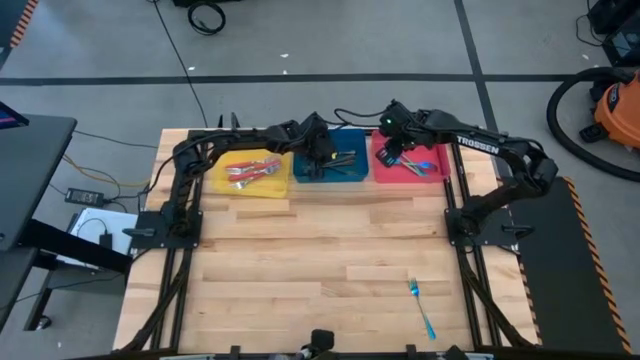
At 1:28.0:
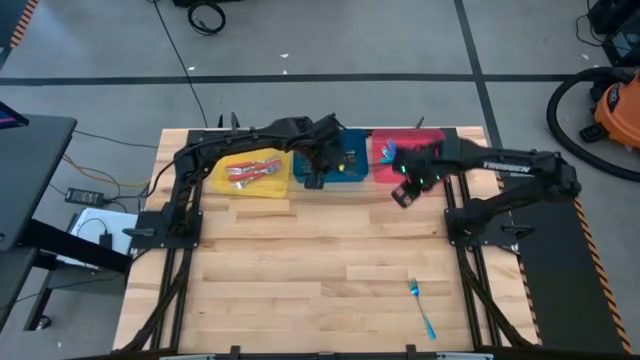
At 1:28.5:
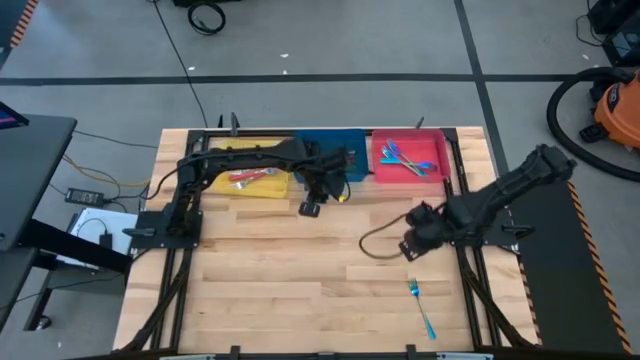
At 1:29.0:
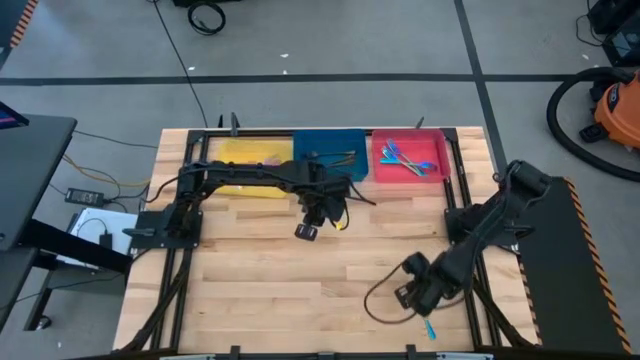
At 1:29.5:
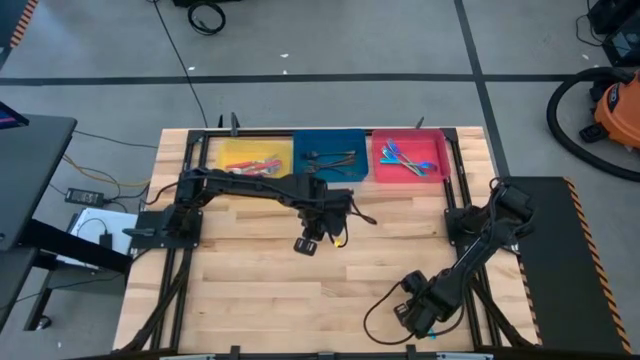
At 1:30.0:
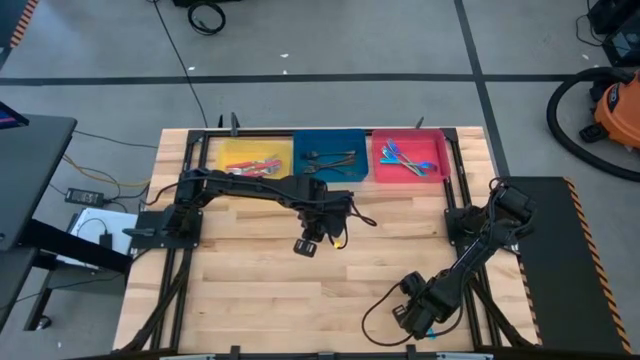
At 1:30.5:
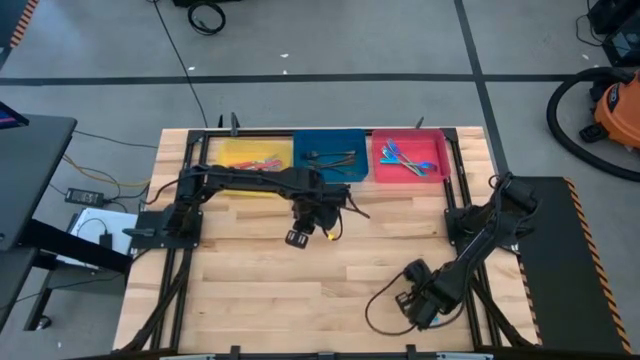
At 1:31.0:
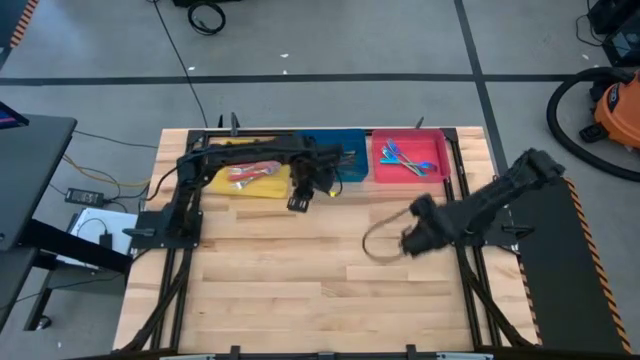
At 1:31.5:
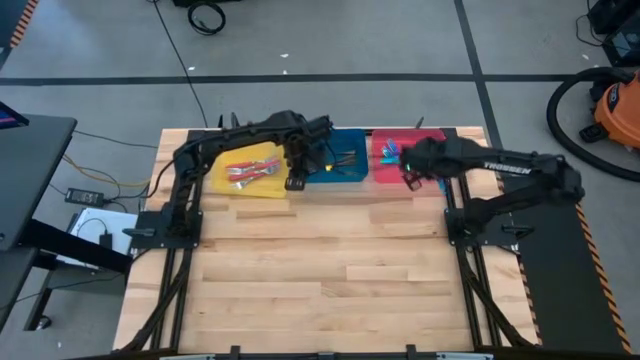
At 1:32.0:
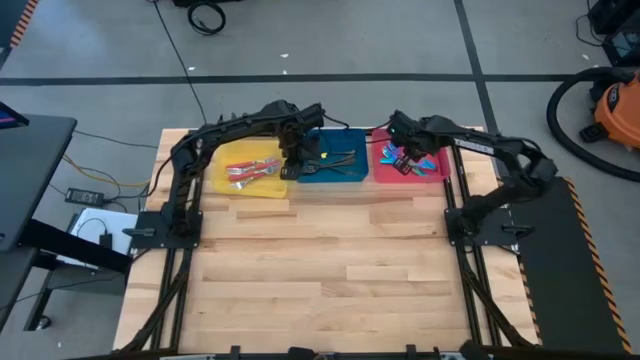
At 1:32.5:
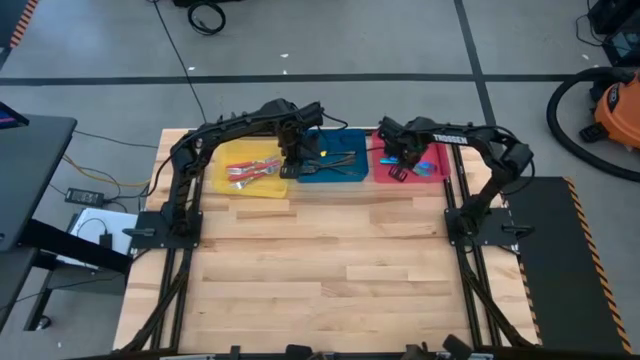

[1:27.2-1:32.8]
Task: Sort silverware by color (type)
Put the blue fork into the pink bin

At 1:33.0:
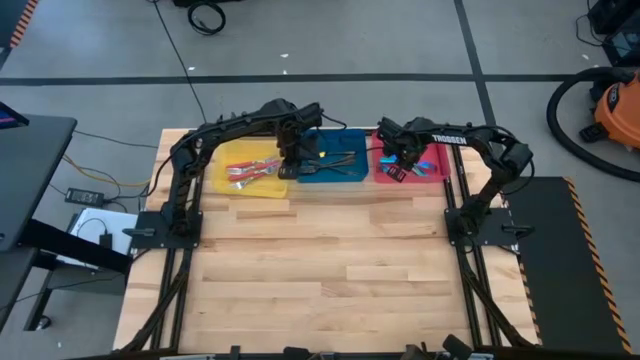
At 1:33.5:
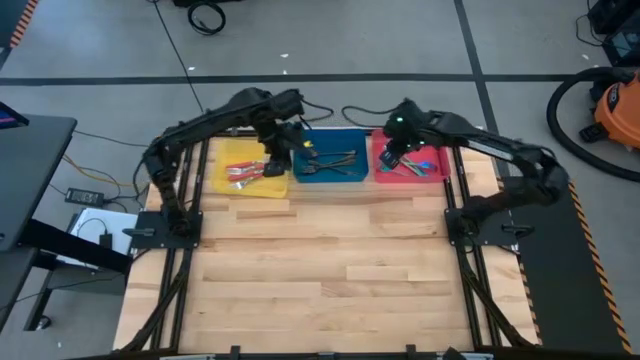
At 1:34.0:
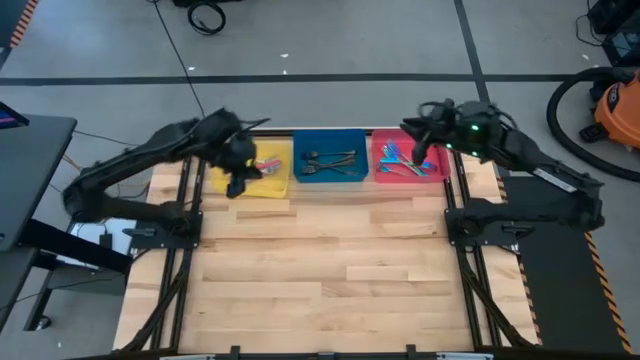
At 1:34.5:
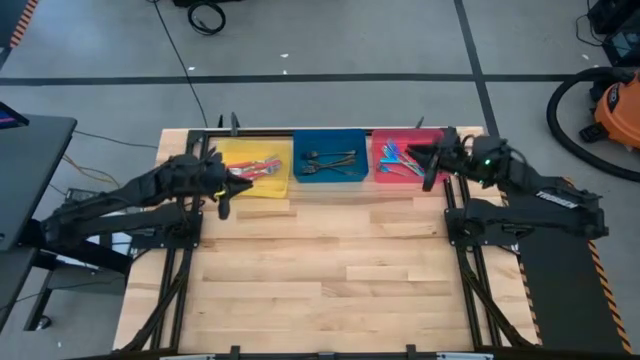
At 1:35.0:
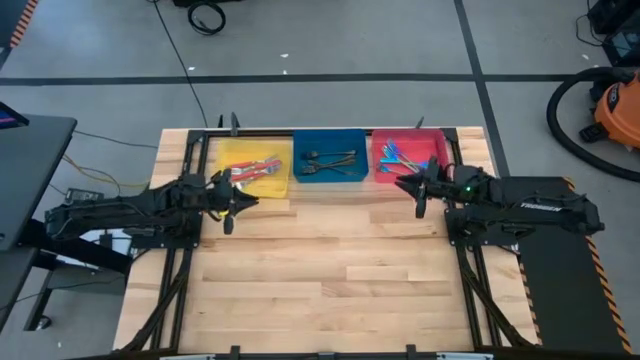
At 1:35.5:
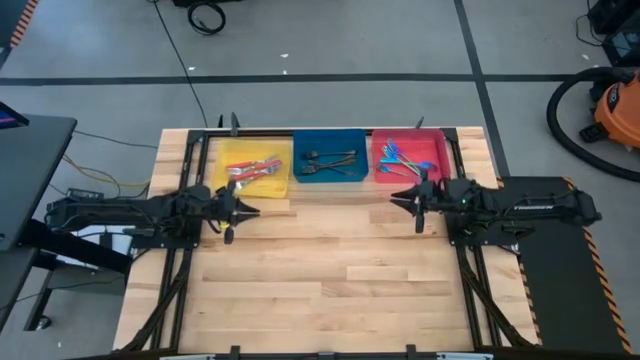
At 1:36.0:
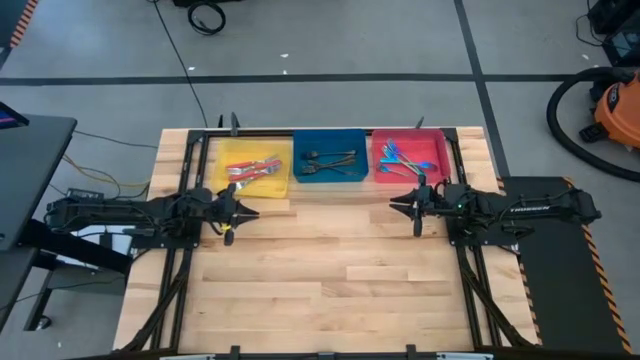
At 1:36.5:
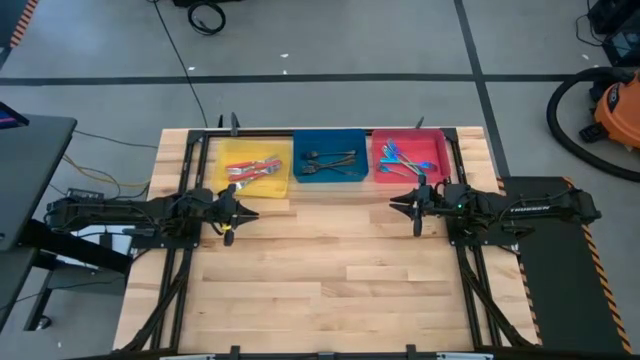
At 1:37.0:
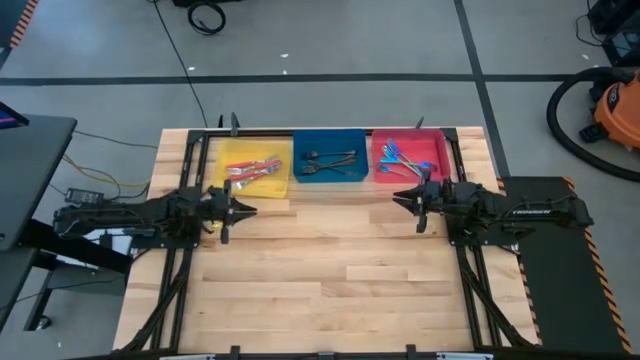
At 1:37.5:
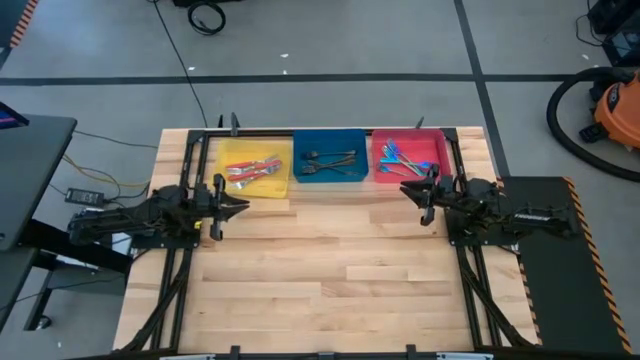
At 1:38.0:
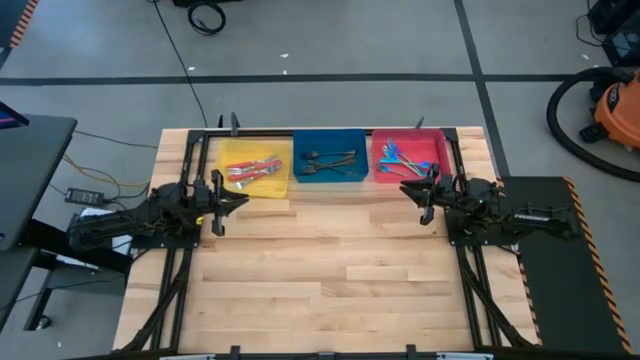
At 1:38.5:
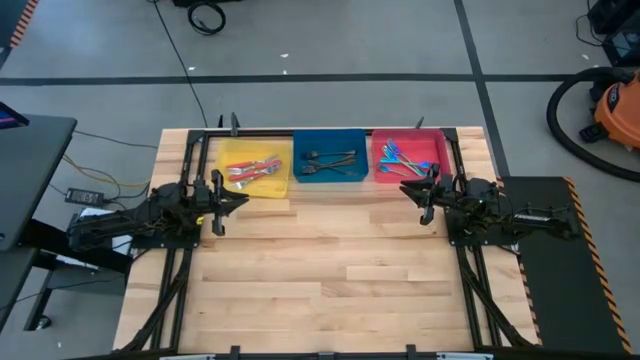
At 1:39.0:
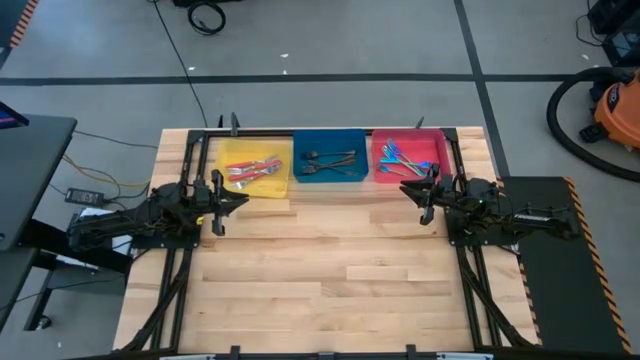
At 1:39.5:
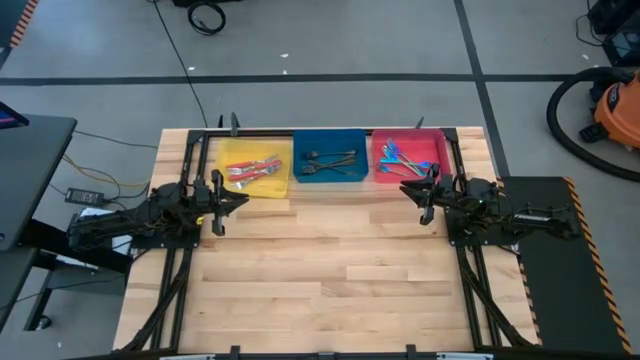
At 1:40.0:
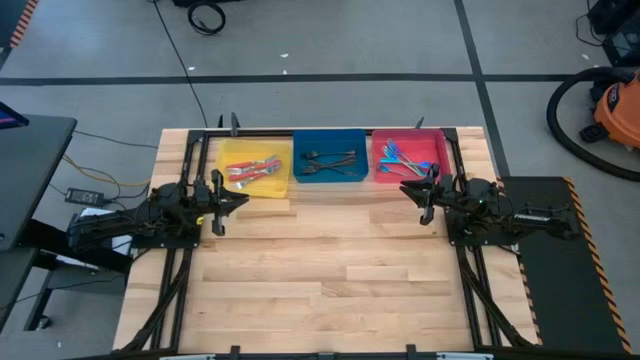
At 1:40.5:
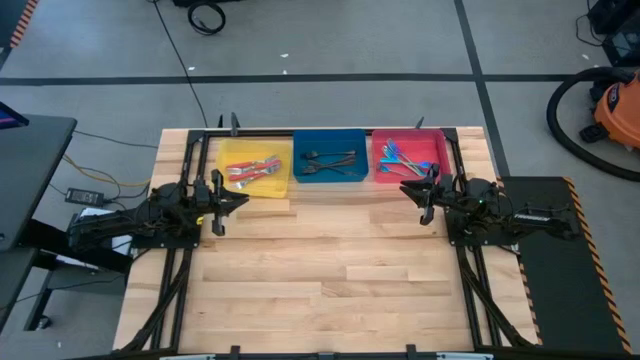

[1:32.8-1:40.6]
Return to Home Position

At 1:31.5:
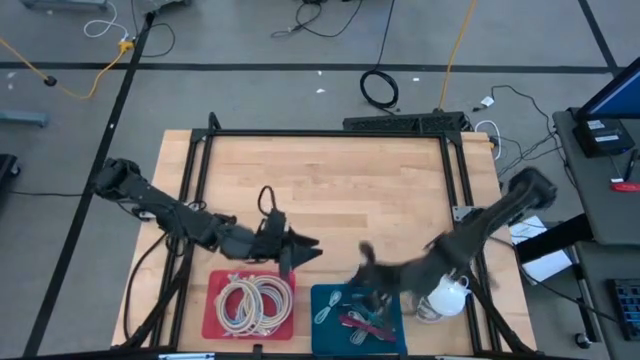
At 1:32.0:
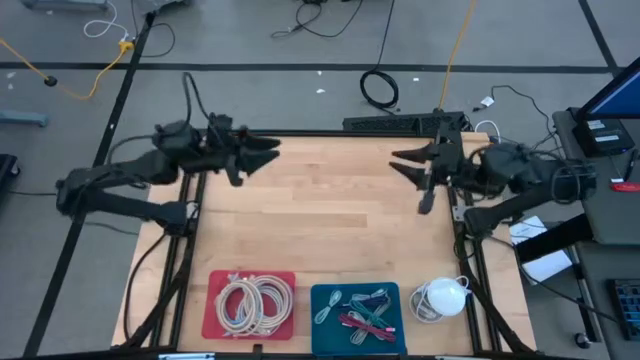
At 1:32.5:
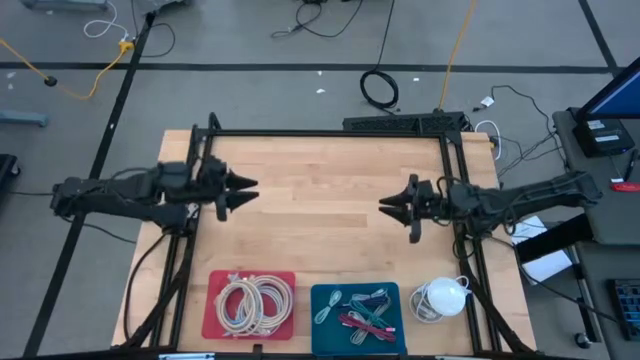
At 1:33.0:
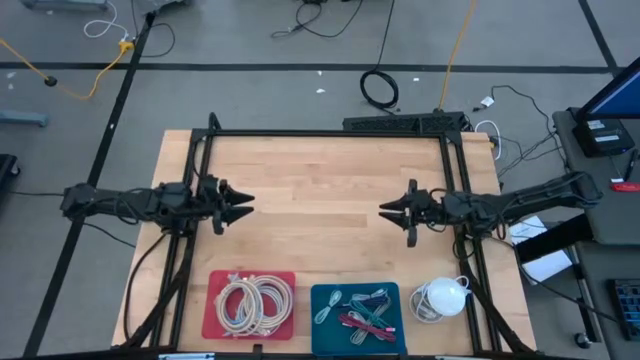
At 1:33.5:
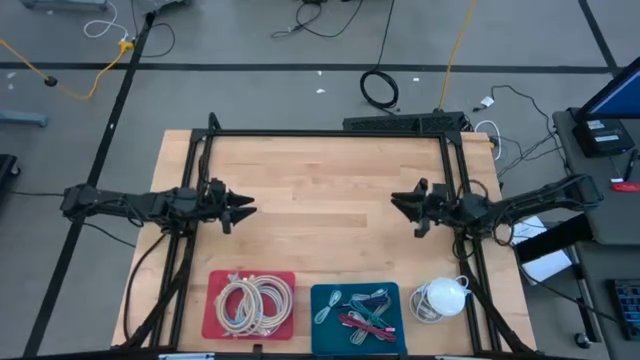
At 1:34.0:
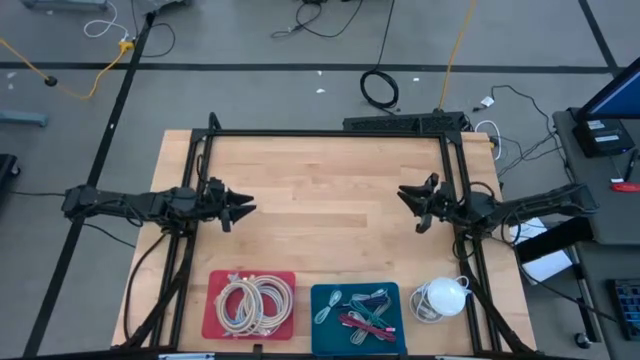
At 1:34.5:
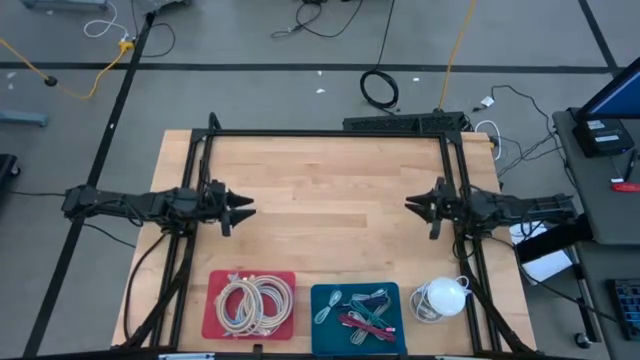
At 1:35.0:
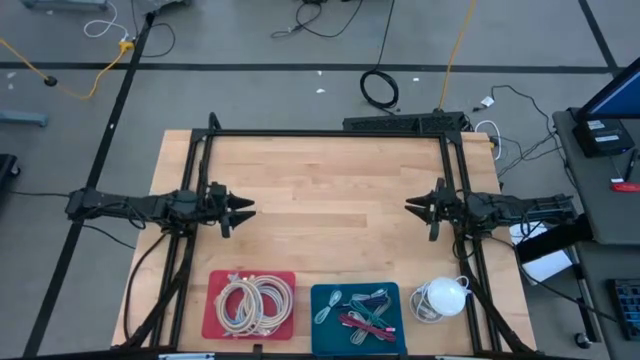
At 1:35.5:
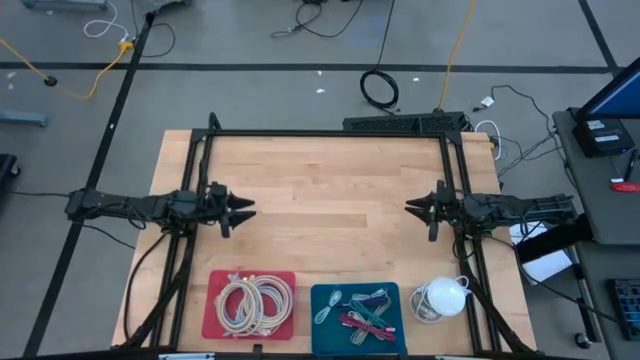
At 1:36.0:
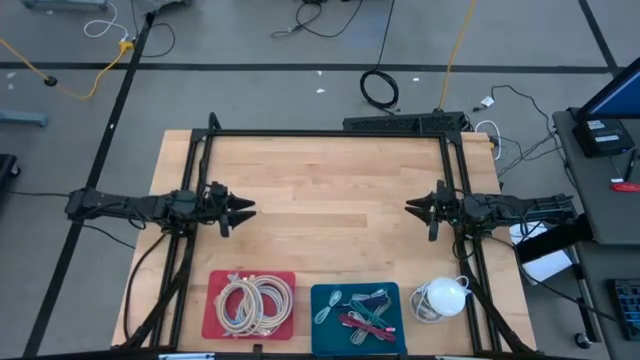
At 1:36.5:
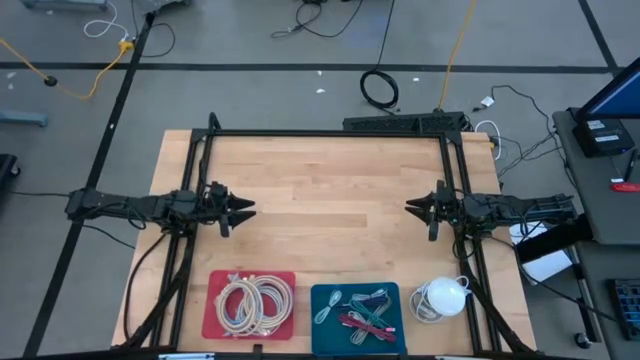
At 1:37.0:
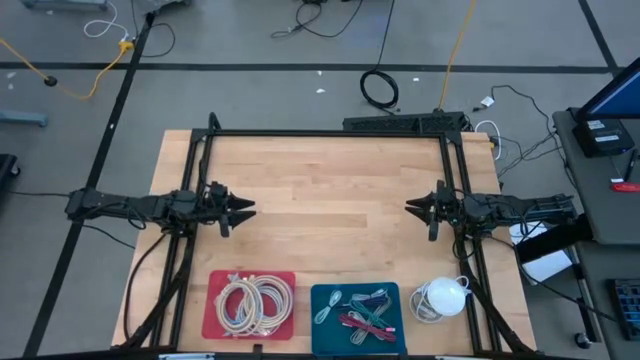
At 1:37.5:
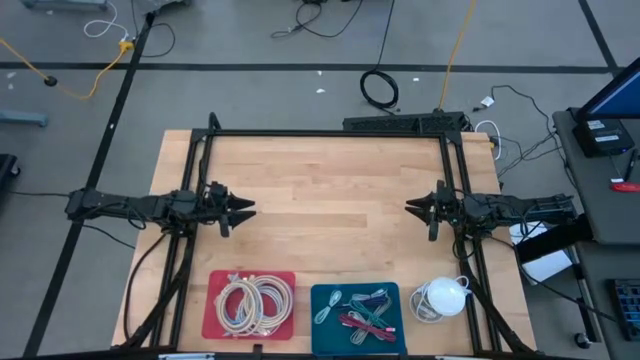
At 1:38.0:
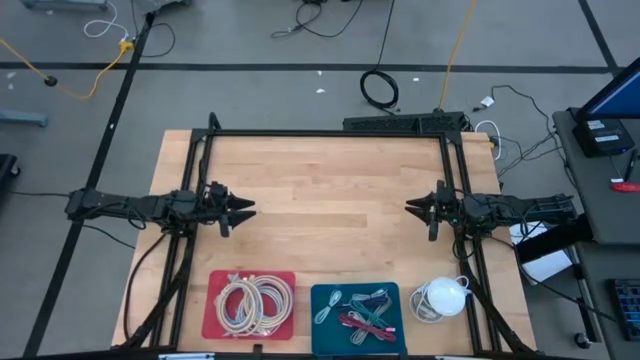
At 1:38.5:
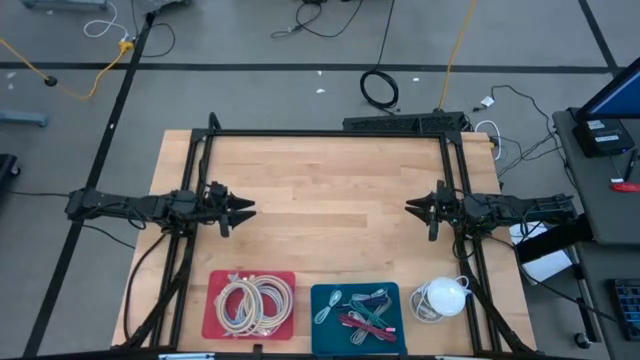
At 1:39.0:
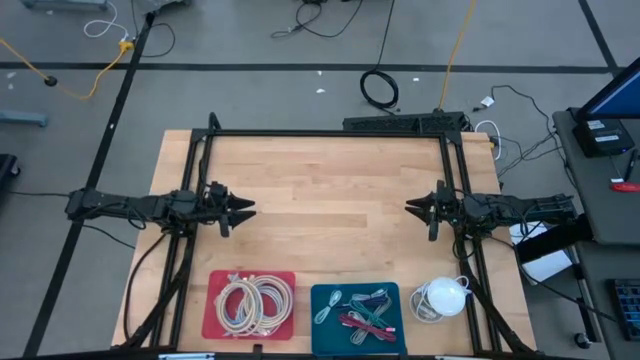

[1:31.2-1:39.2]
Task: Pick & Place USB Port
Return to Home Position
